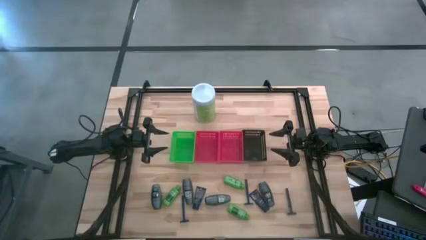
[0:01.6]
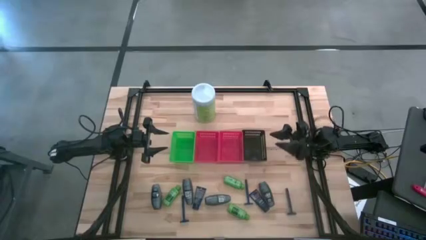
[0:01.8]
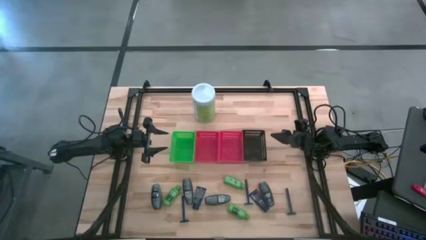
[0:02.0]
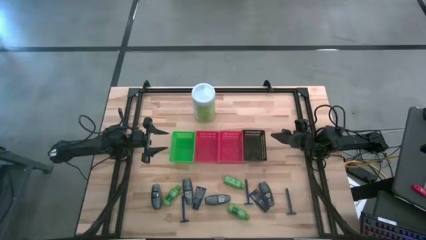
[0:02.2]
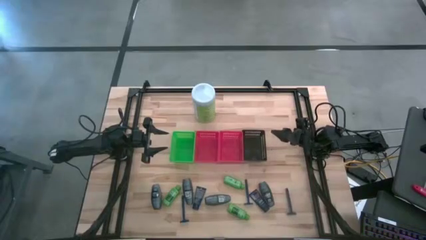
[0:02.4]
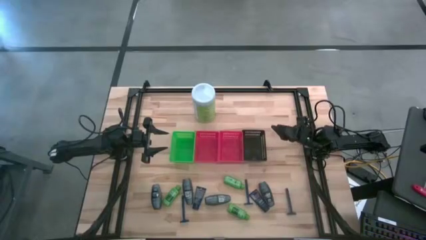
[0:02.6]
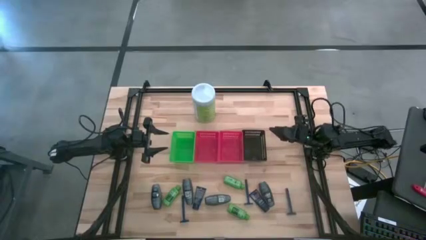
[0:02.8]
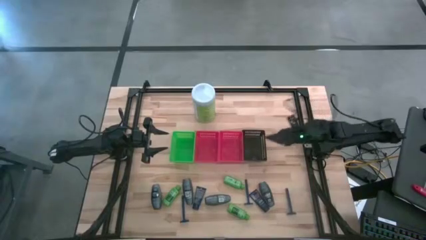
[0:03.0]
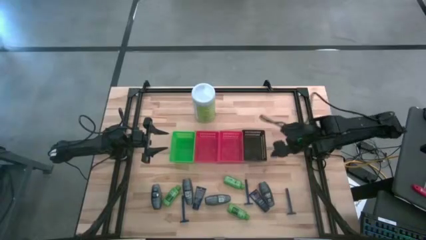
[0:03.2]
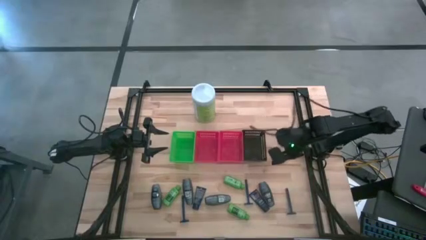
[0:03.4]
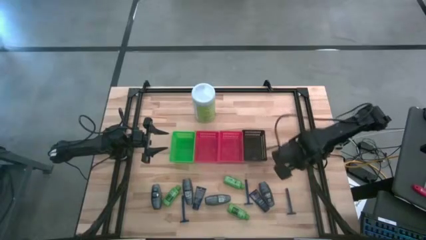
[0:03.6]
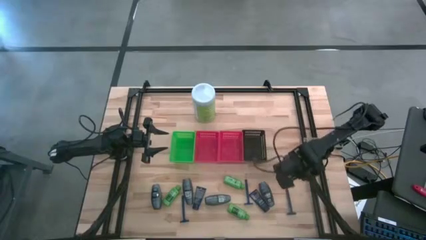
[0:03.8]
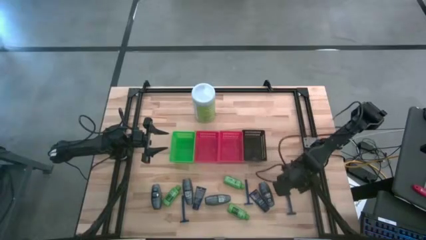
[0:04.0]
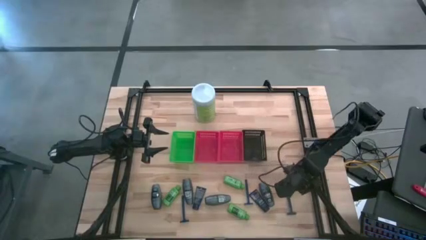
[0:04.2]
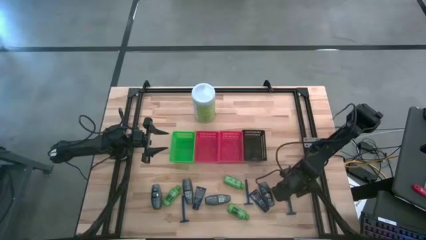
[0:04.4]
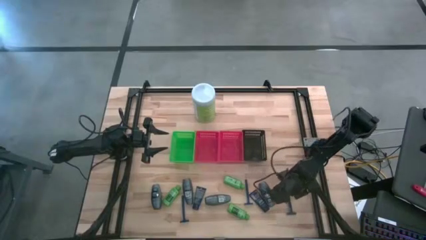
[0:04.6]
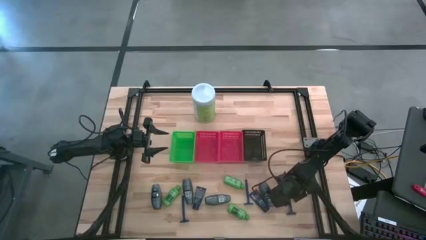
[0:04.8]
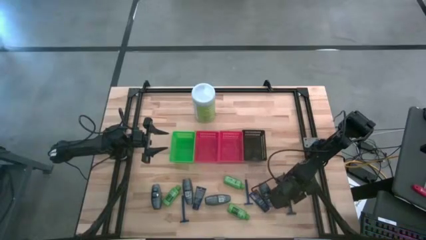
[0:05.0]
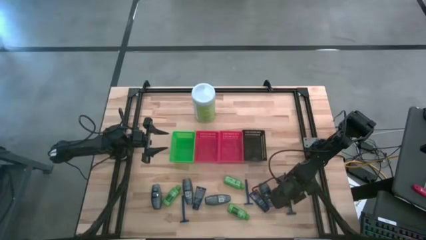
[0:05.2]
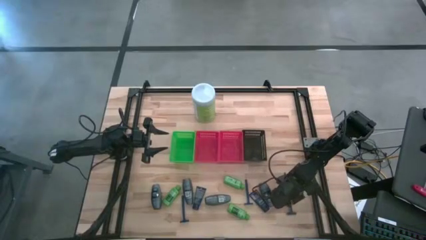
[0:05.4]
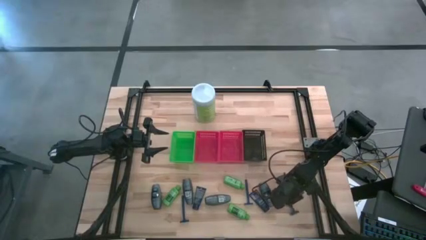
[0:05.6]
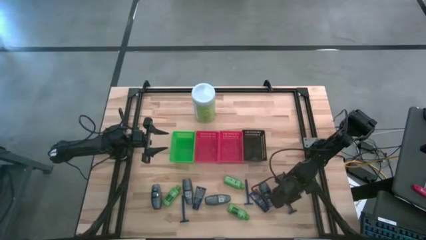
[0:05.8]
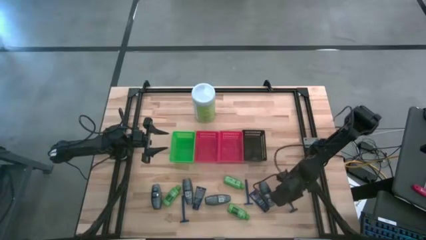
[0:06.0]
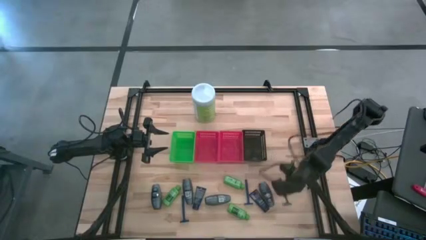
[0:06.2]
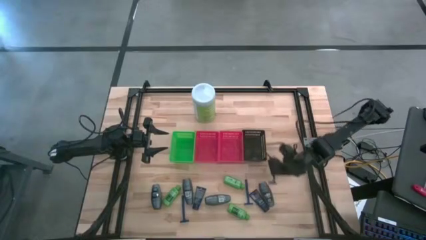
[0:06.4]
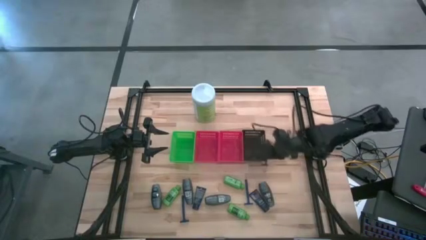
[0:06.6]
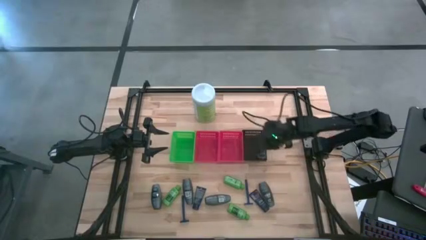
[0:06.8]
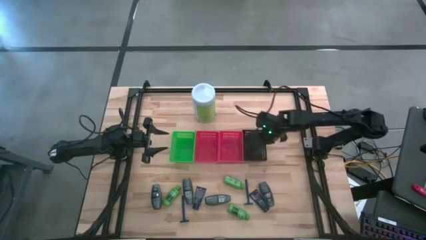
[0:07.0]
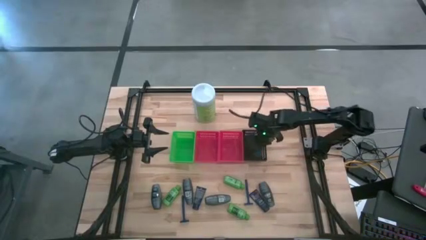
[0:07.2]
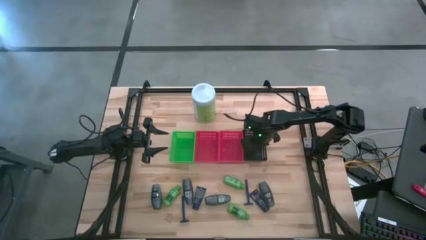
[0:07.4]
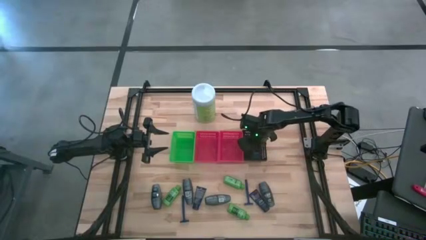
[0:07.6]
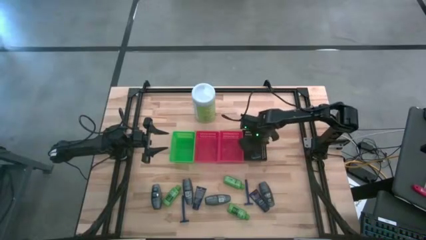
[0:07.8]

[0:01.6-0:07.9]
Task: Pick & Place Travel size toiletries
Put the blue razor in the black bin

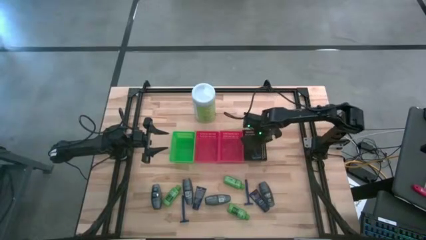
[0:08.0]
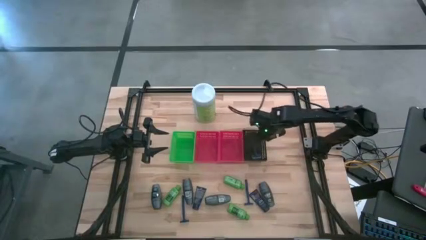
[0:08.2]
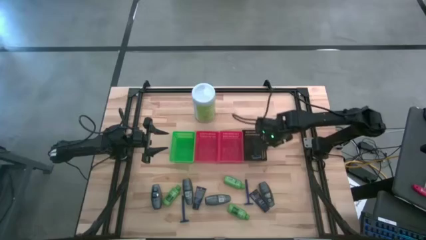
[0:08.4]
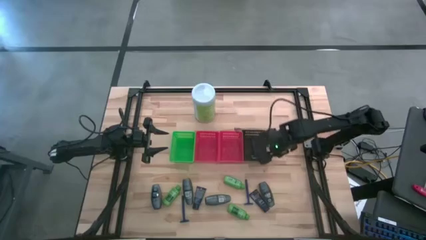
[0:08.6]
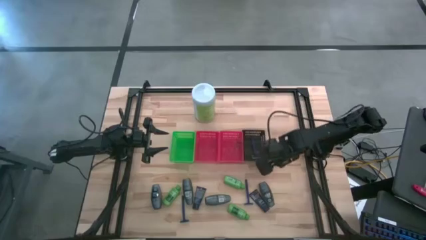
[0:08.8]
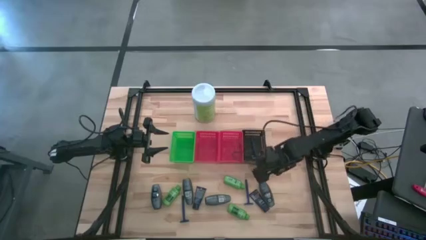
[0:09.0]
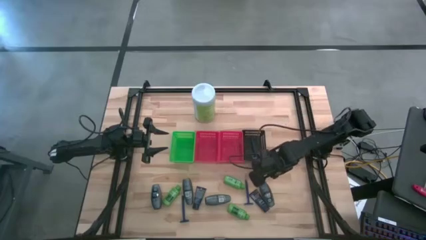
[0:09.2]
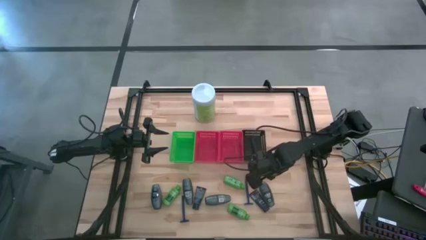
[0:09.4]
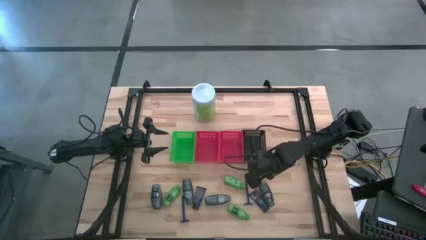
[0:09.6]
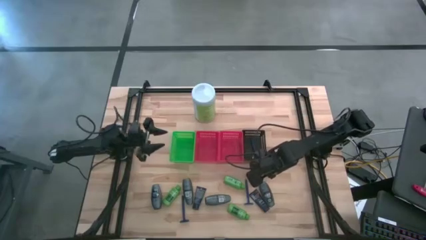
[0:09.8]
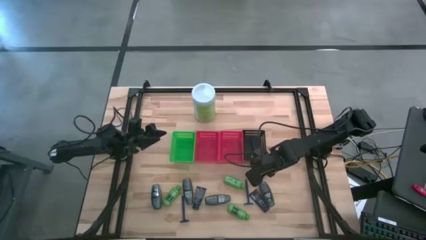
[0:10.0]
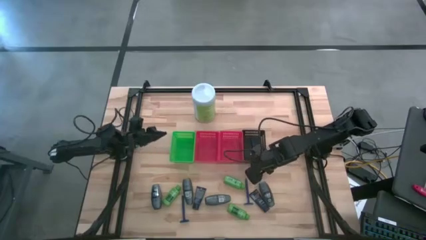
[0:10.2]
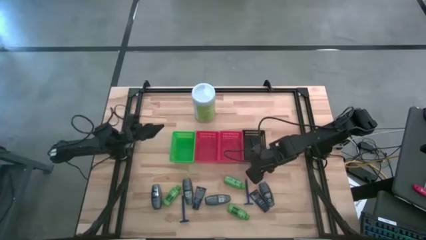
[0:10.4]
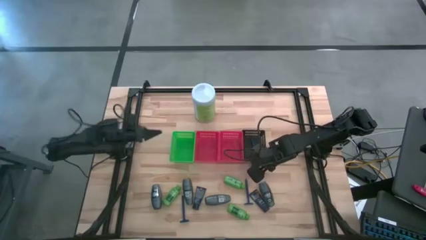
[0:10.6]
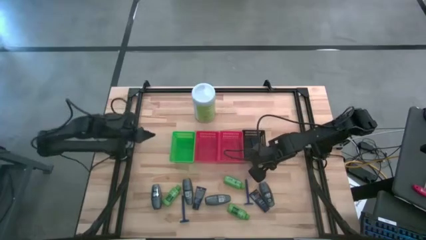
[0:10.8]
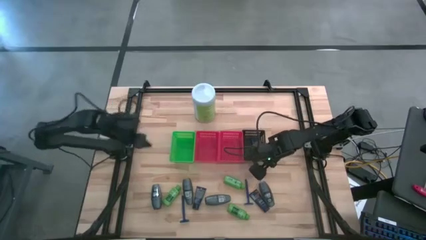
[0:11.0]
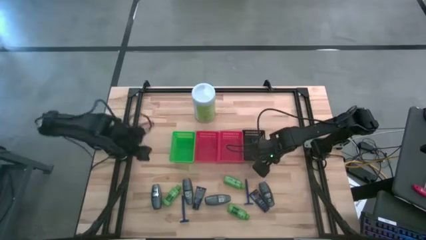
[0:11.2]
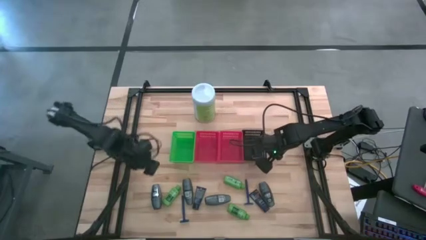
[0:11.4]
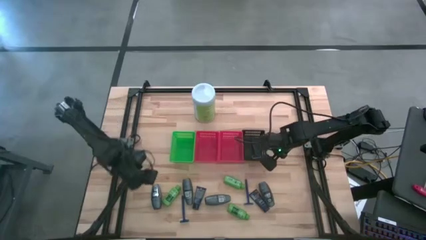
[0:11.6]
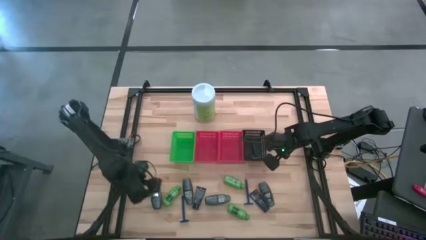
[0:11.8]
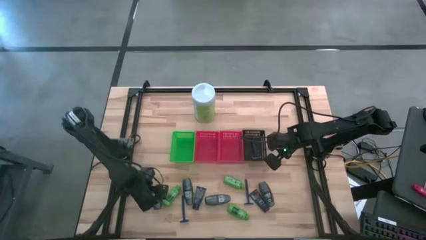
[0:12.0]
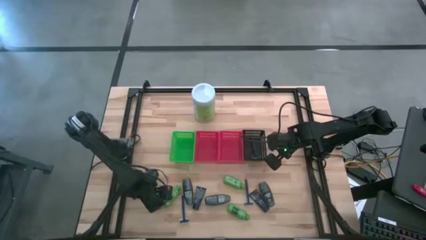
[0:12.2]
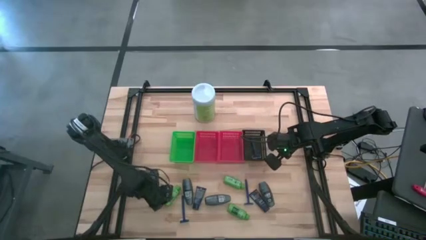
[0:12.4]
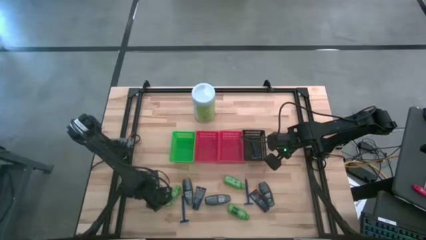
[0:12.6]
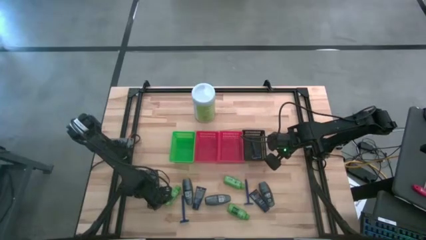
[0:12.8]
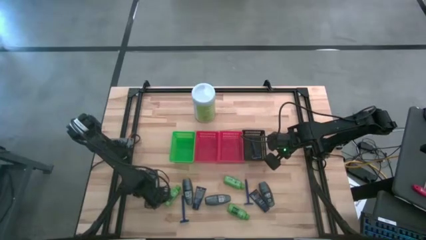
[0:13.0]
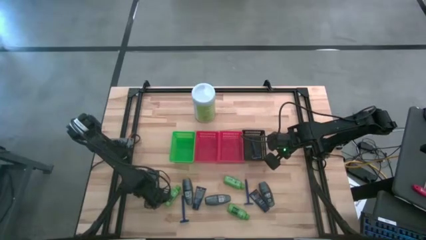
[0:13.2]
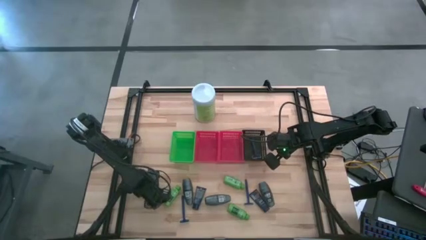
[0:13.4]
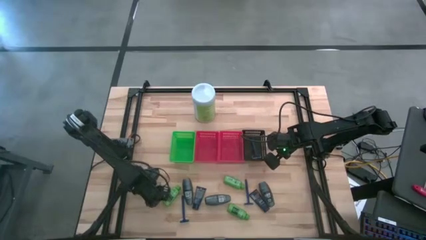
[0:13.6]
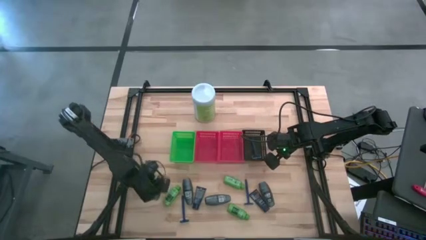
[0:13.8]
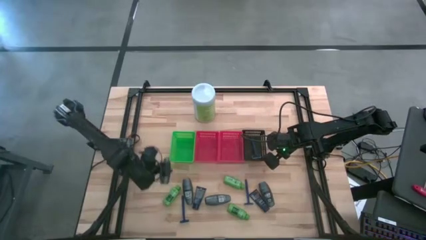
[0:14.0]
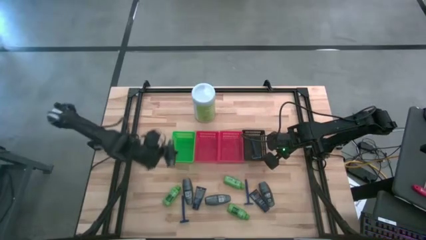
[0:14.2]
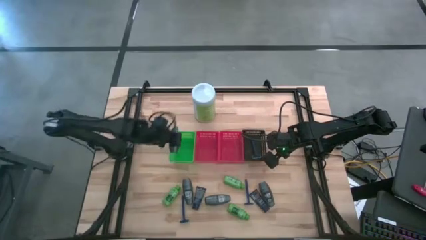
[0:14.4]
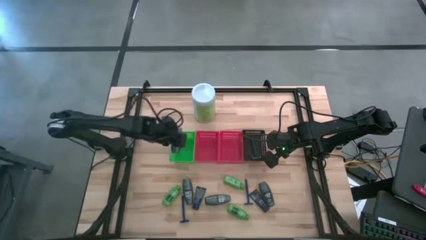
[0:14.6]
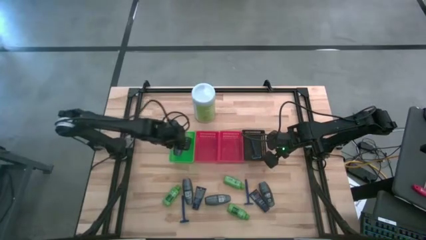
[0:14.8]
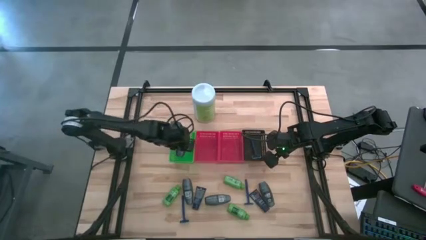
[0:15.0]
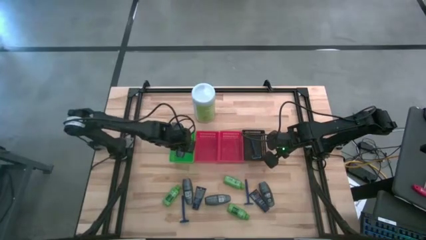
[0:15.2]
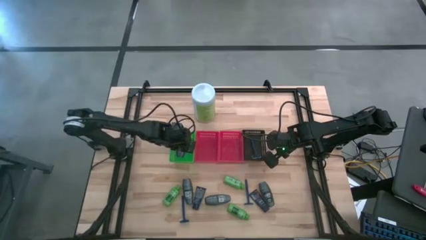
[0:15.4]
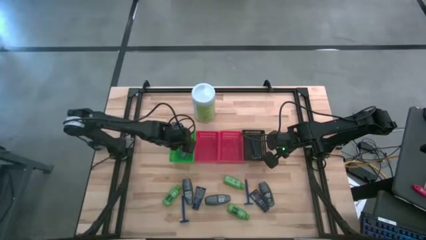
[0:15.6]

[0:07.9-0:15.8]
Put the gray deodorant in the green bin
